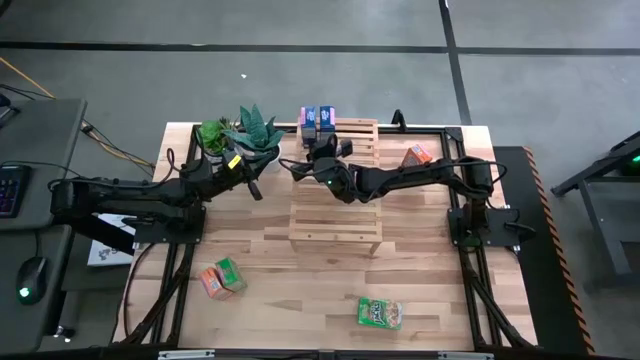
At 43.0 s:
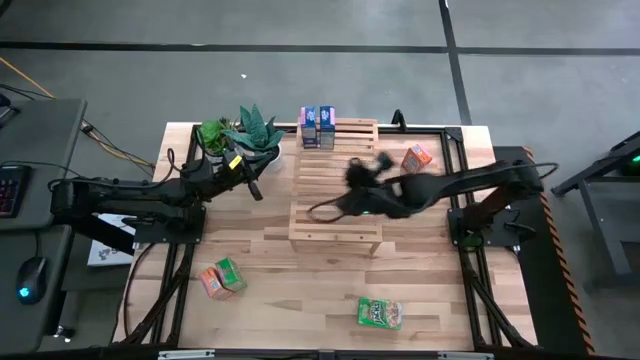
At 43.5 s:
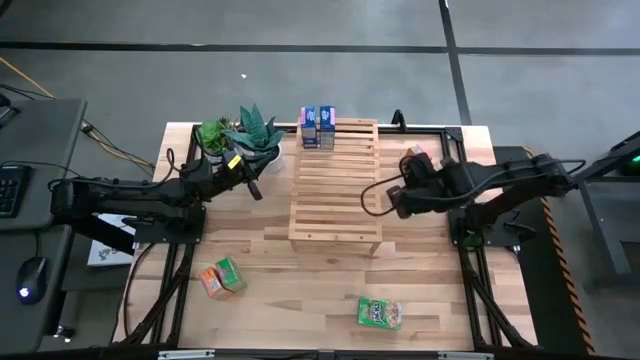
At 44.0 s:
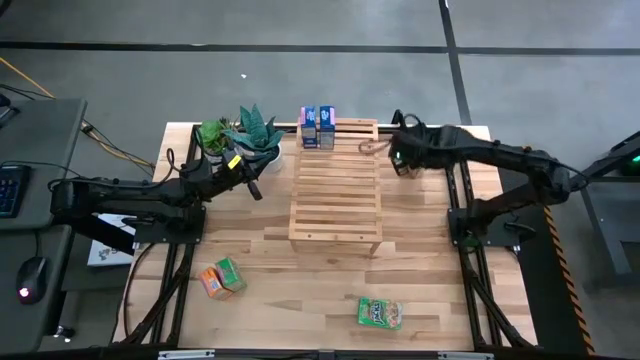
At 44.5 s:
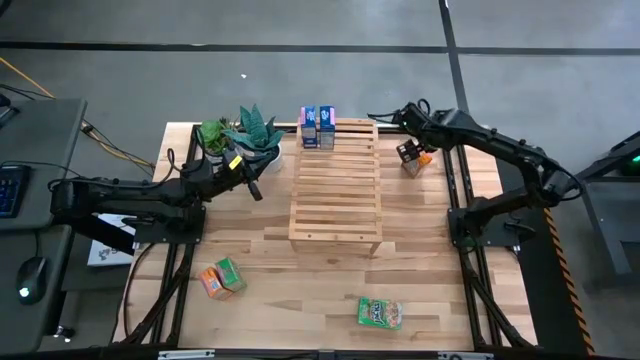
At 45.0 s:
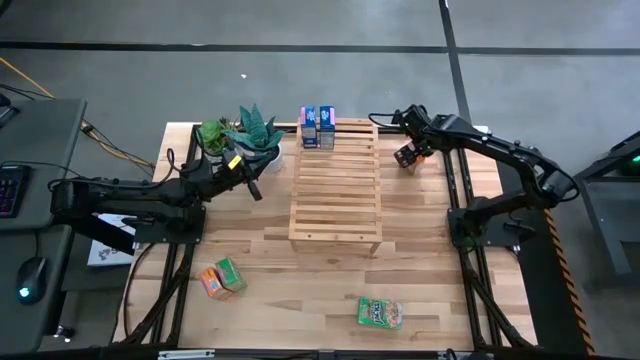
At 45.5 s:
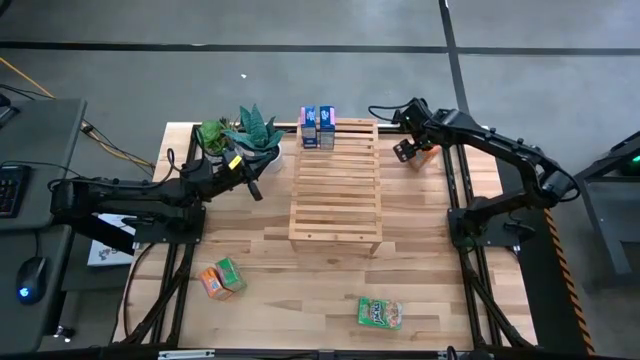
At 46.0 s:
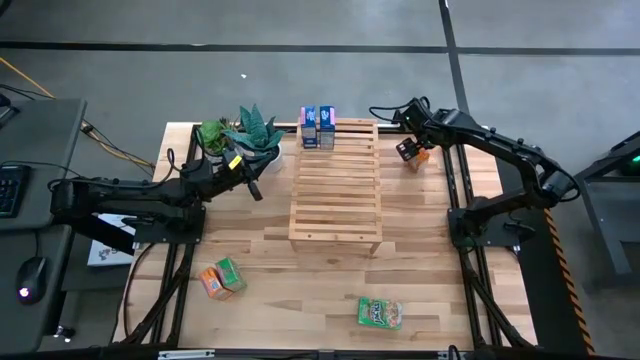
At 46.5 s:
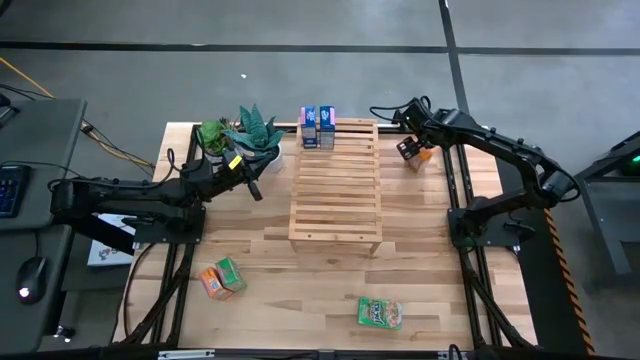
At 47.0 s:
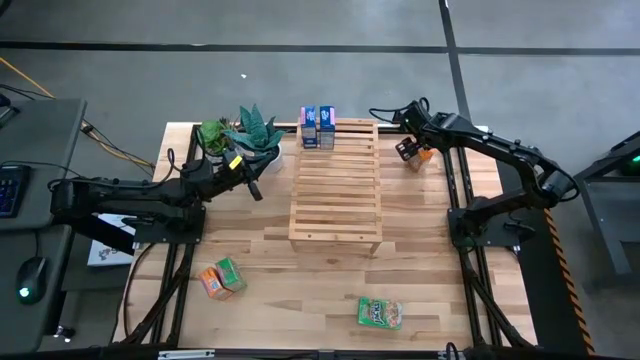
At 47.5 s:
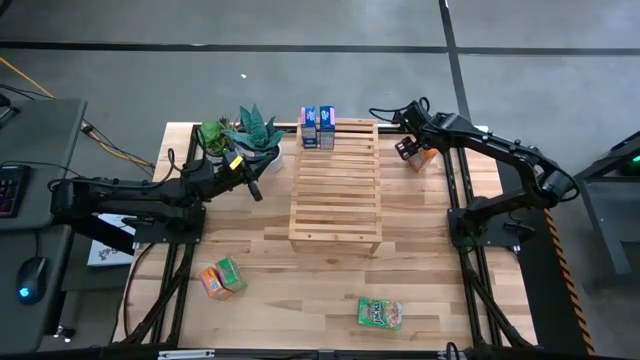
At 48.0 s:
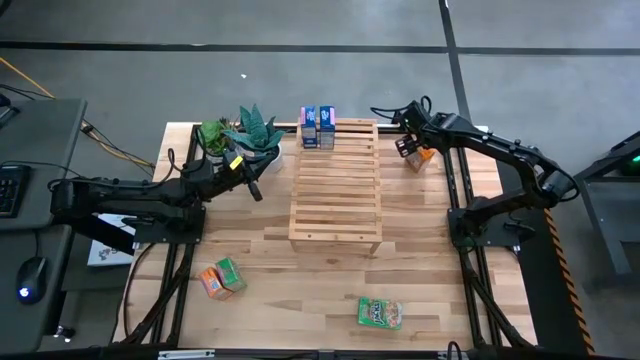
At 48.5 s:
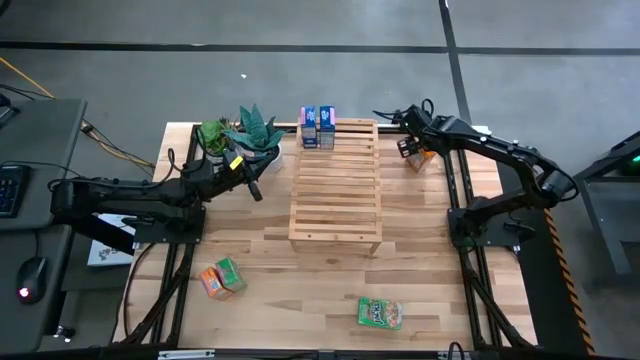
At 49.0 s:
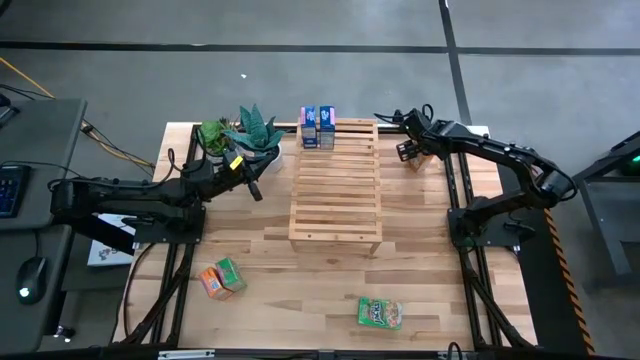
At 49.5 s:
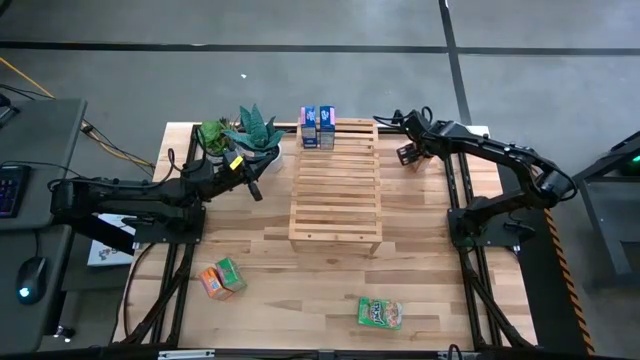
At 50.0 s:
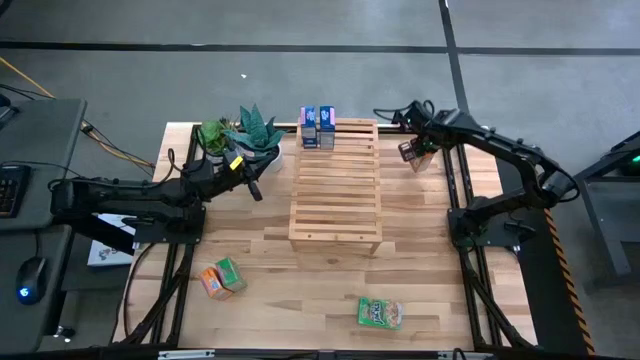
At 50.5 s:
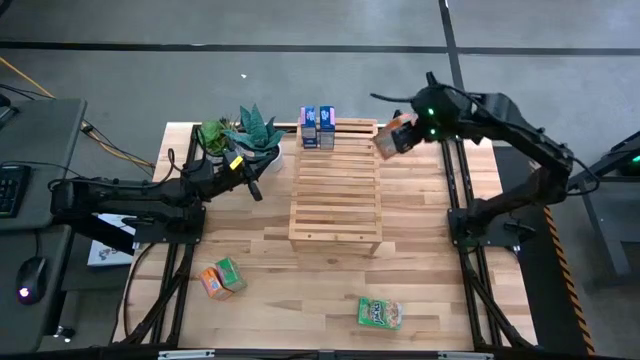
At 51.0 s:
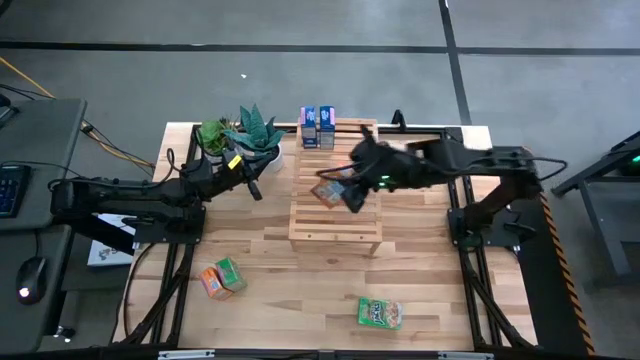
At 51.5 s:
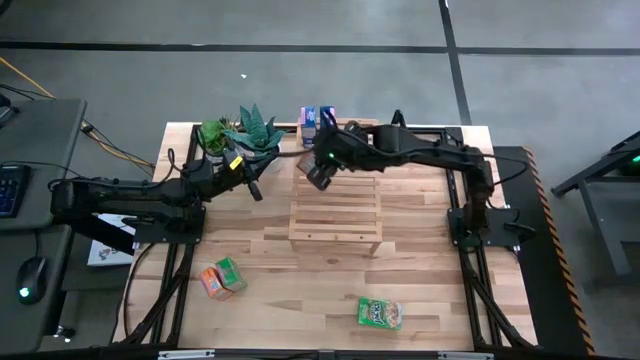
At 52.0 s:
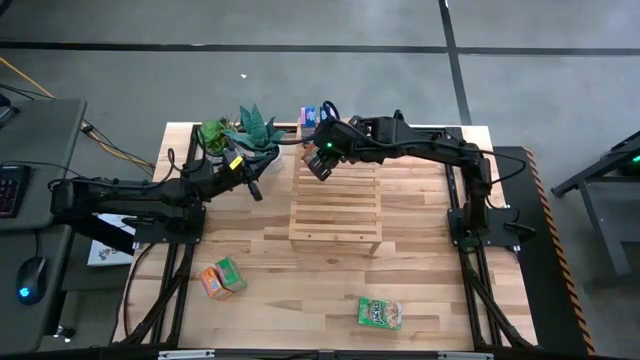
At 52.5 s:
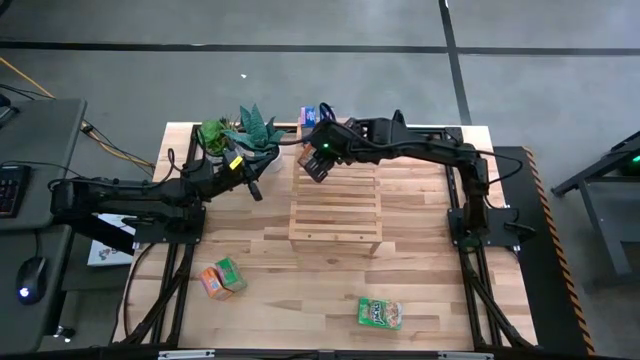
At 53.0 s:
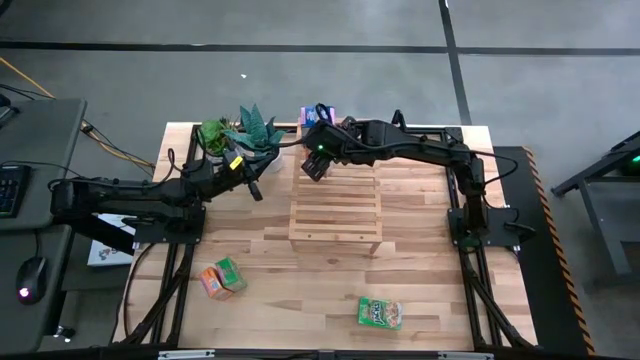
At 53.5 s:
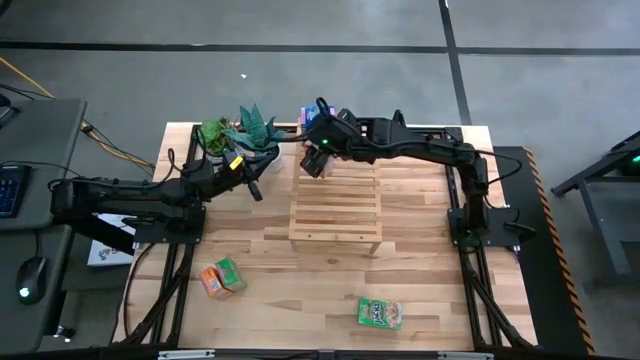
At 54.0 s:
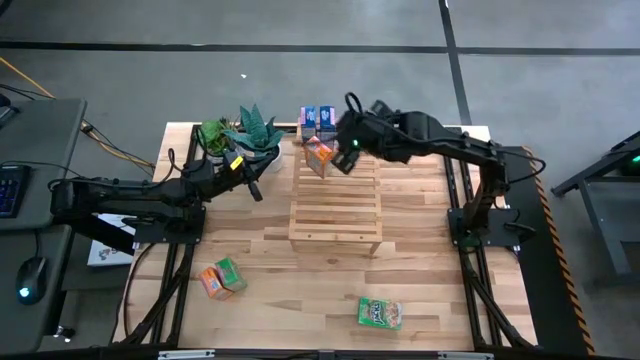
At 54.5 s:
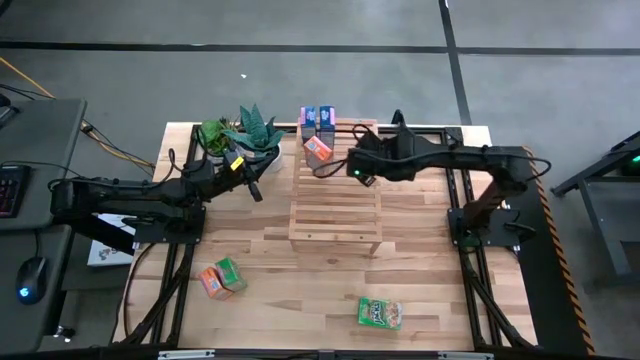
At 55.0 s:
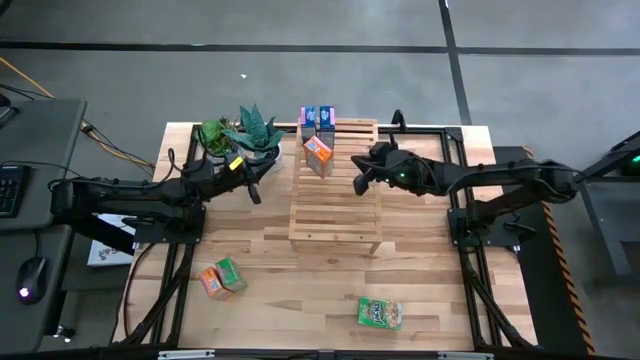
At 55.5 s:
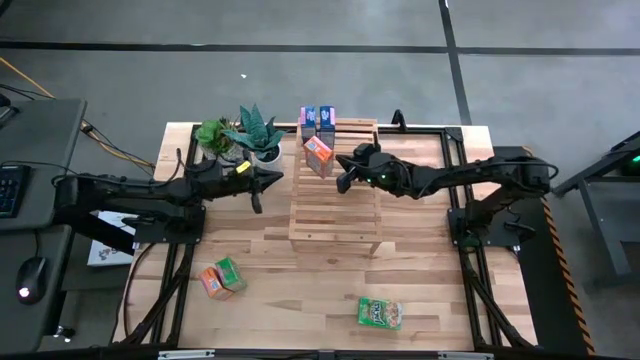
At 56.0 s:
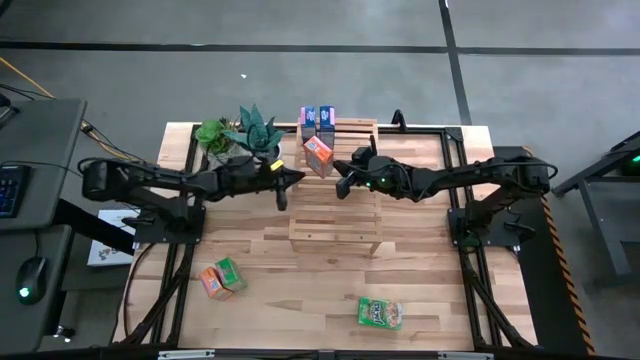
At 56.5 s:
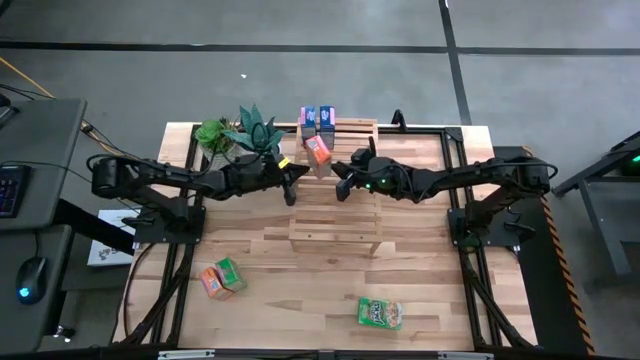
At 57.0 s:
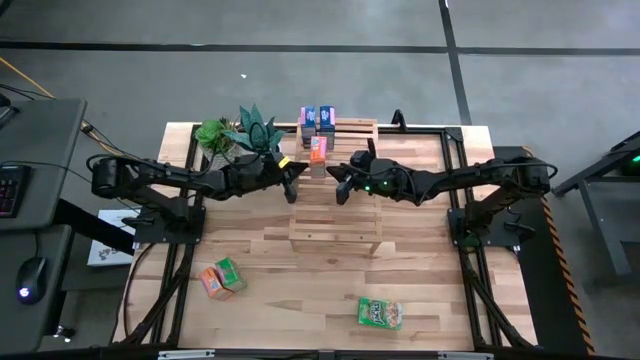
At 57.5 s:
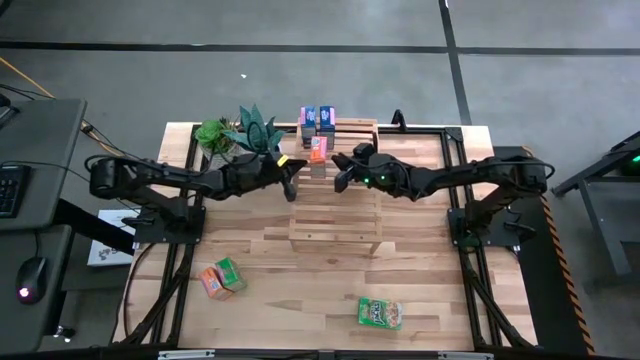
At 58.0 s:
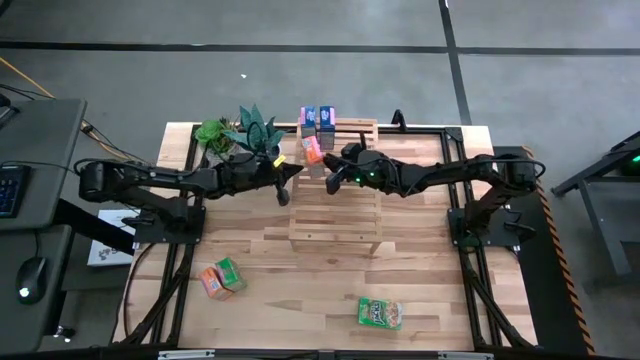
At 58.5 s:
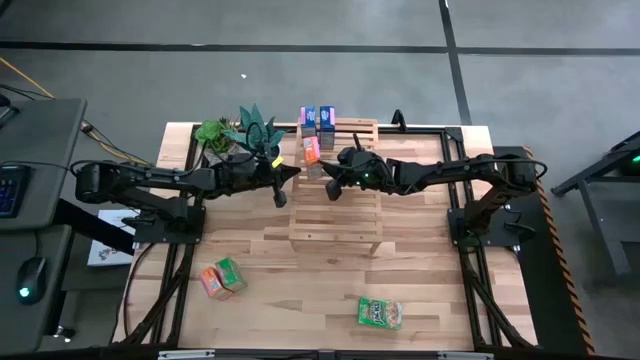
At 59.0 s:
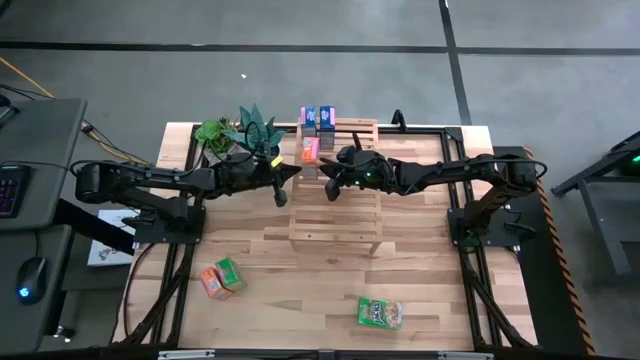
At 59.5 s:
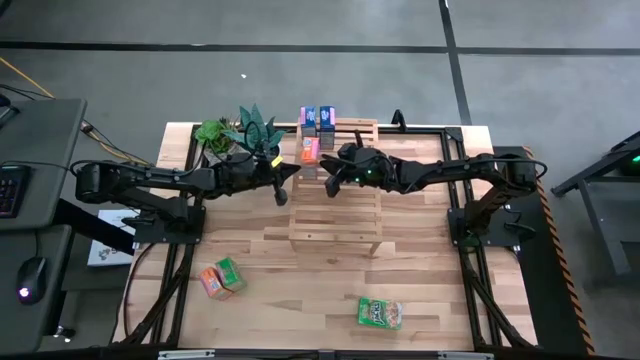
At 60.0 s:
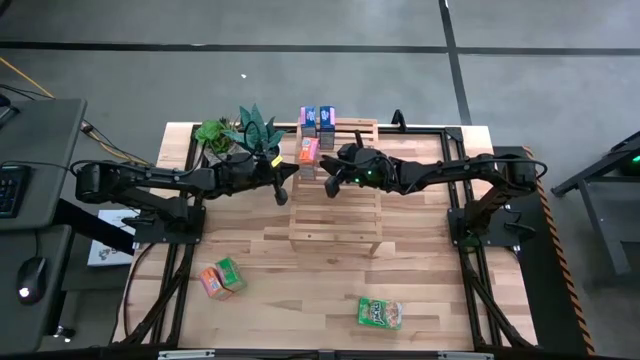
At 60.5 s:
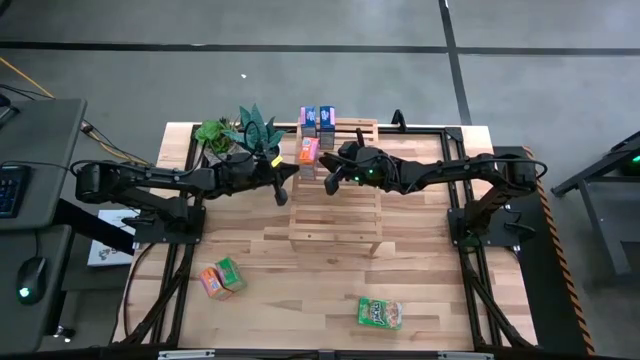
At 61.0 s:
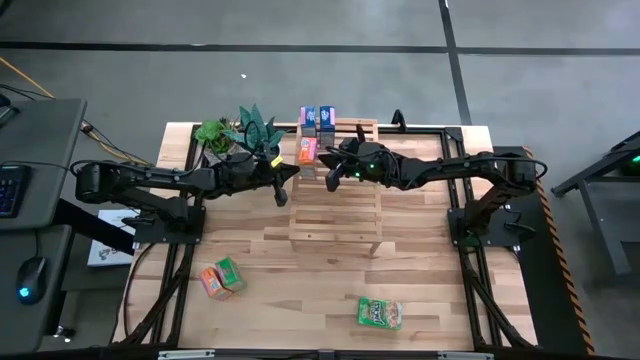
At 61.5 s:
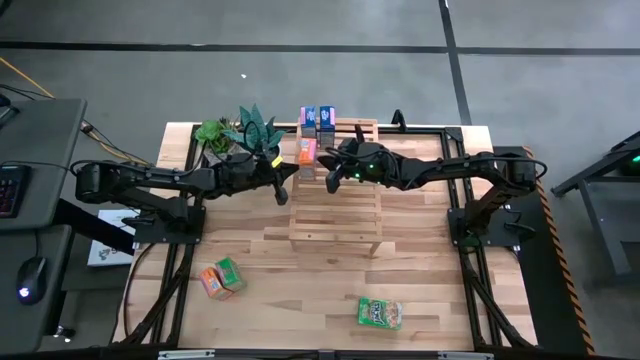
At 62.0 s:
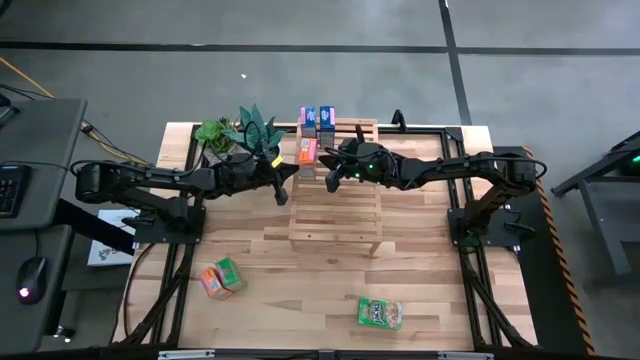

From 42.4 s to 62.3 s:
Task: Stack cereal on shelf
Put the right orange cereal box on the shelf
